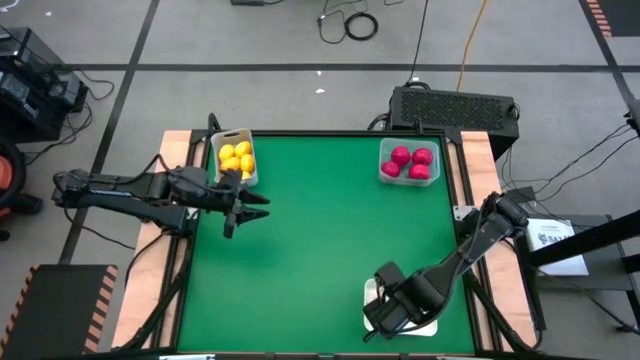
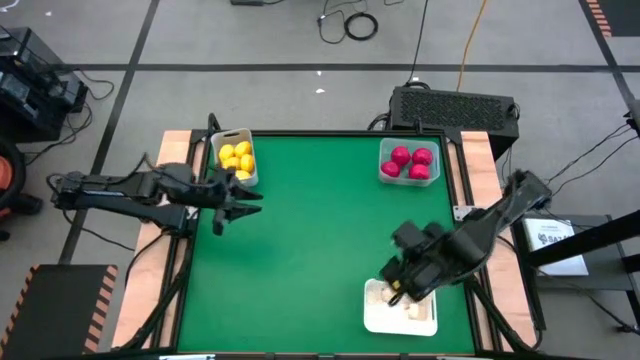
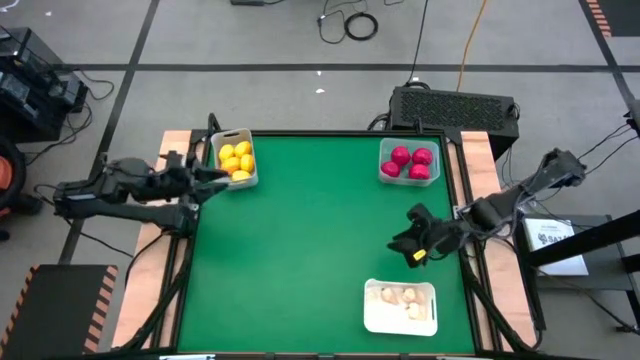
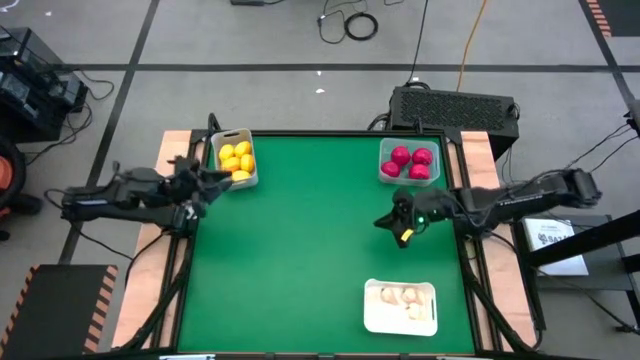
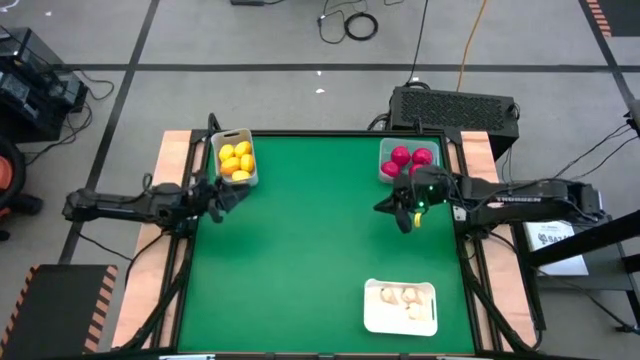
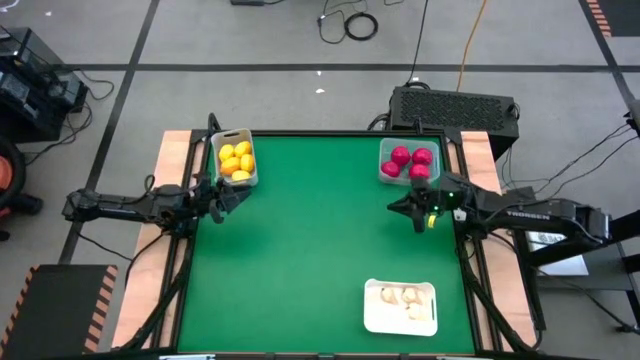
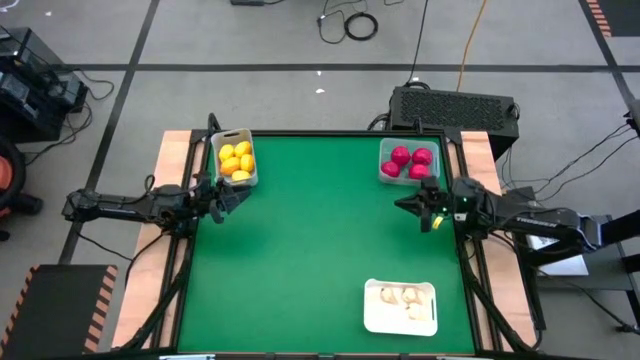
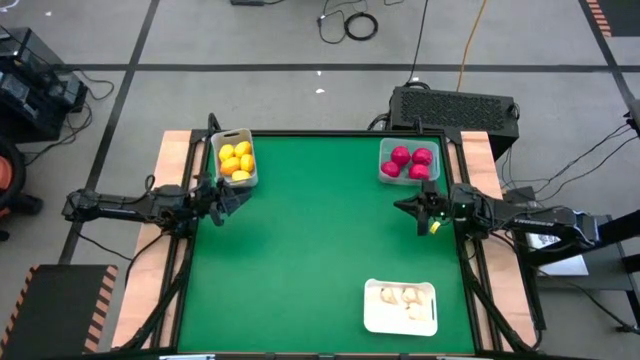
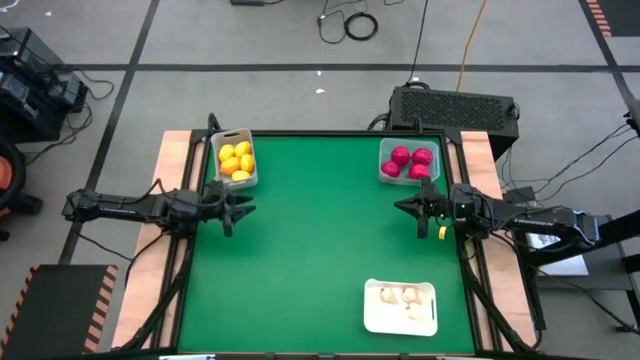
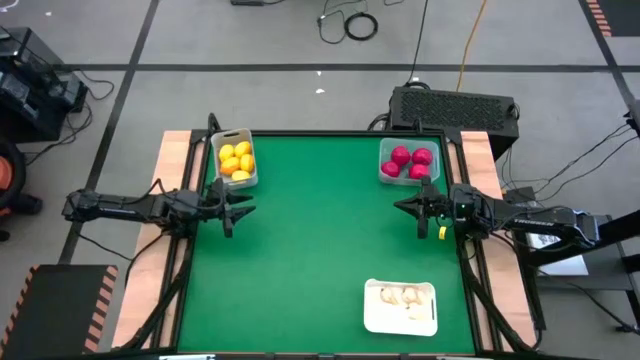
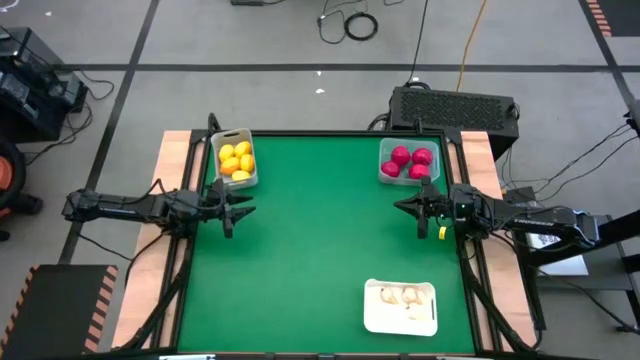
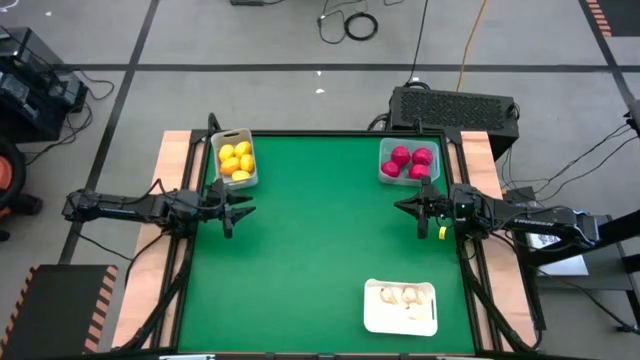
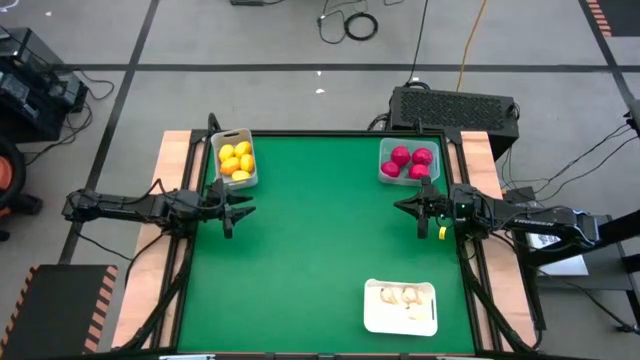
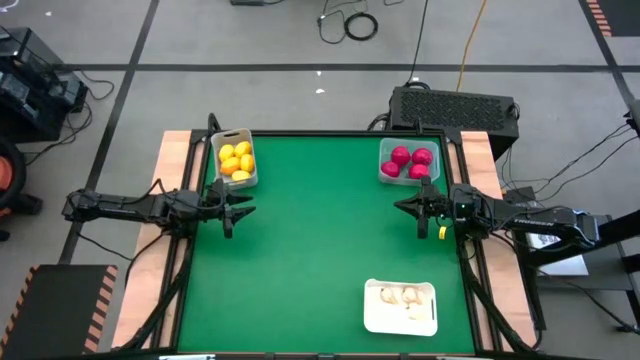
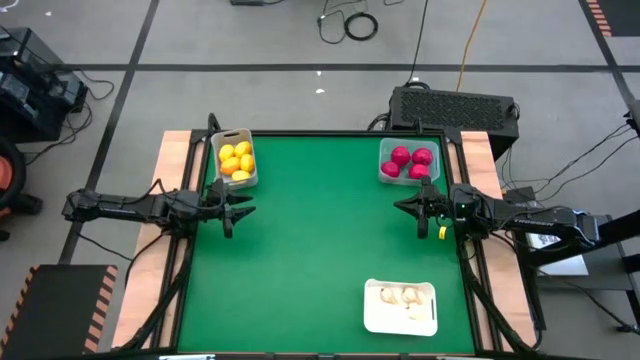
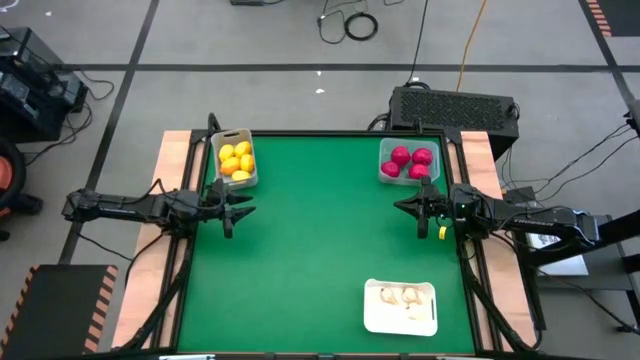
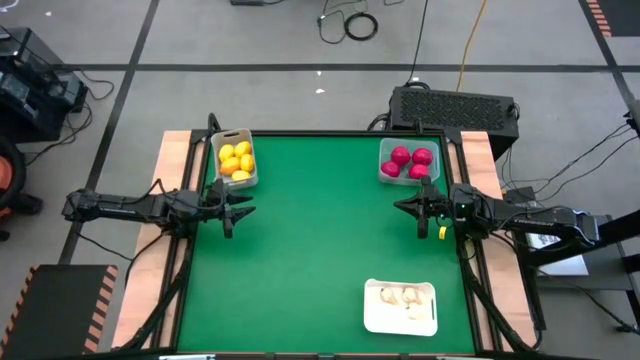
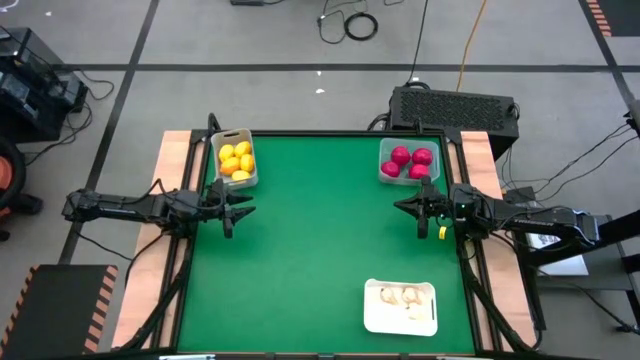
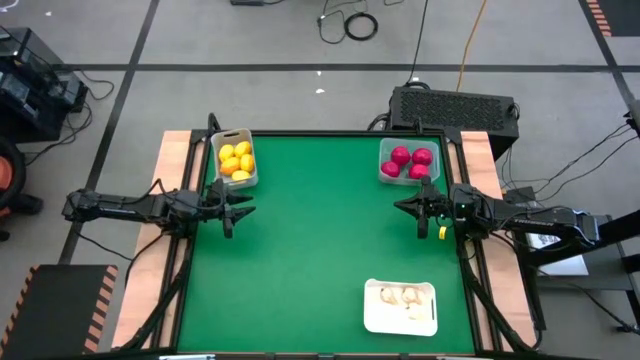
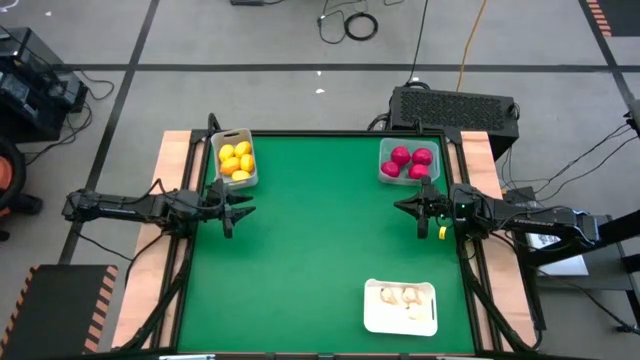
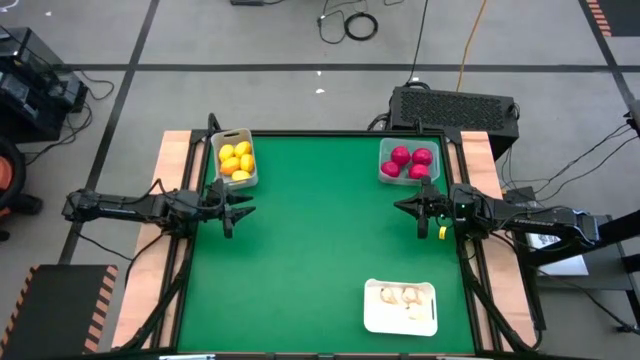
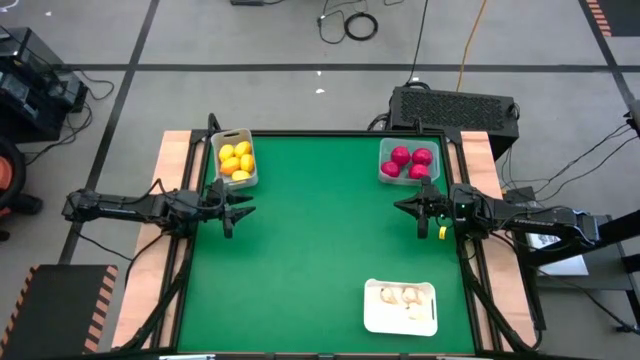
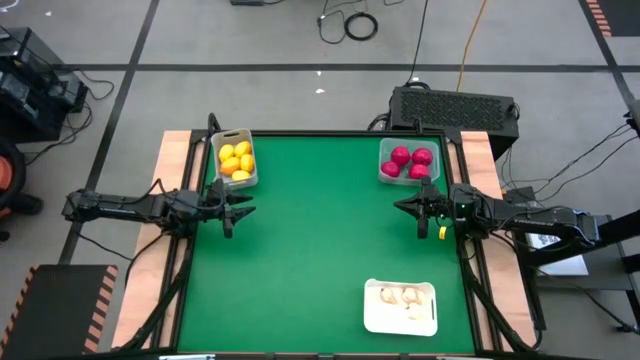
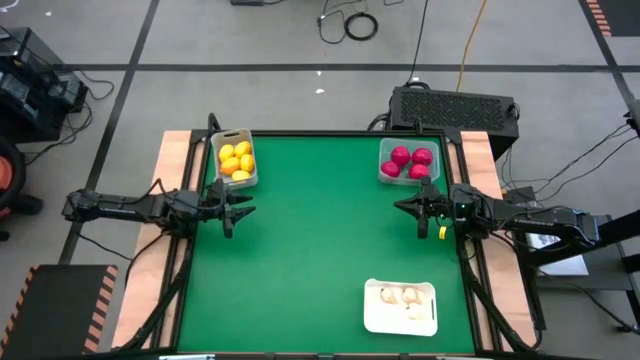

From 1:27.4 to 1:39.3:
Task: Sort produce into baskets
Return to Home Position

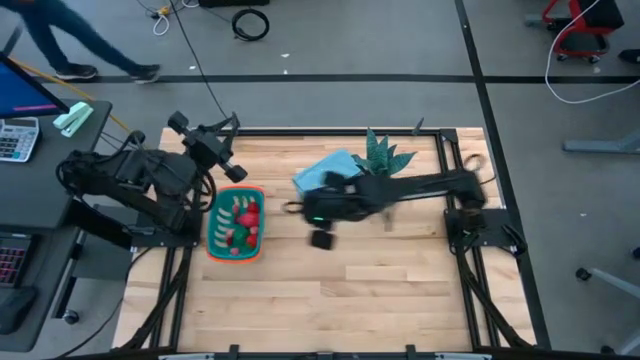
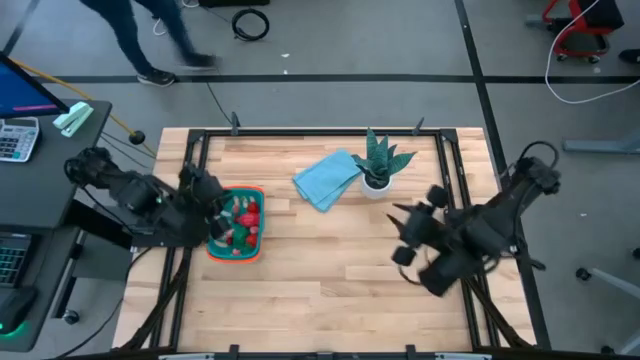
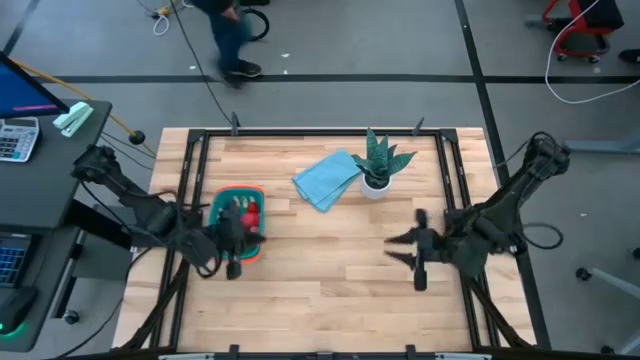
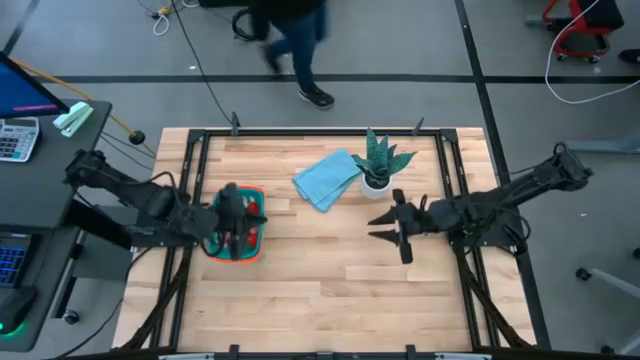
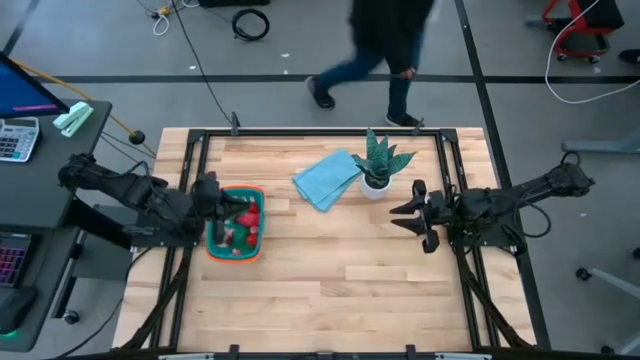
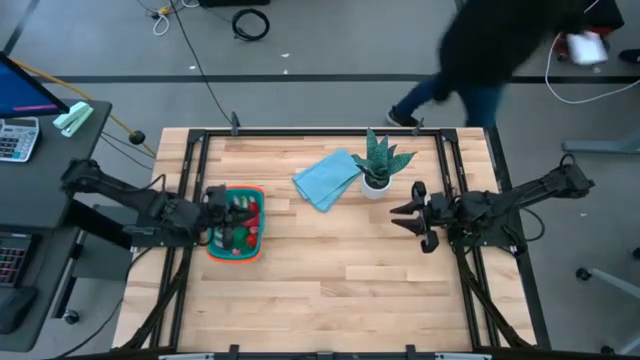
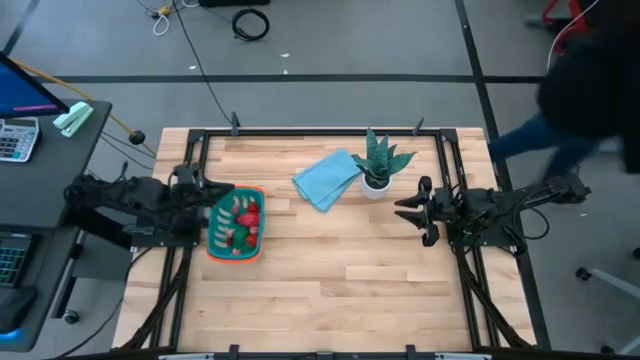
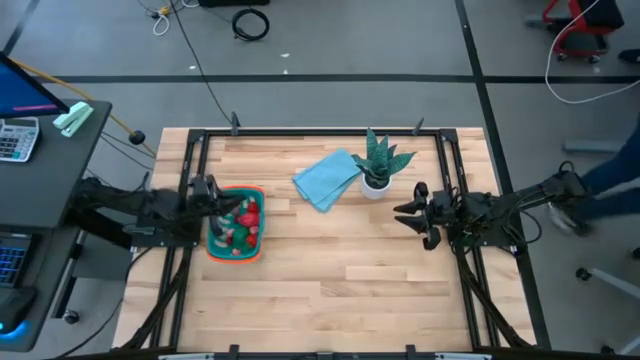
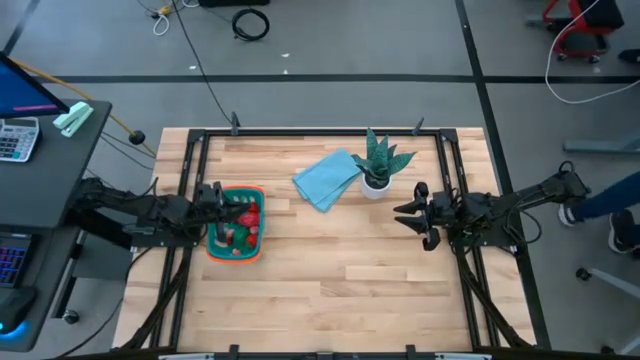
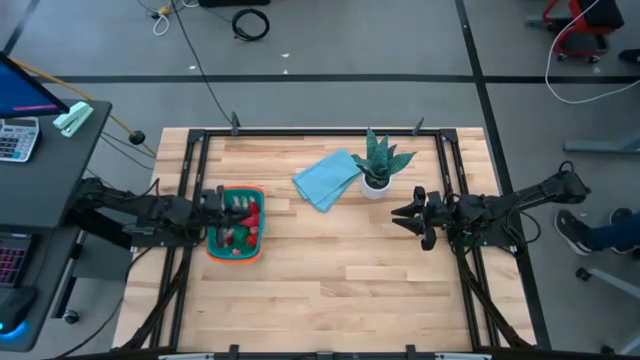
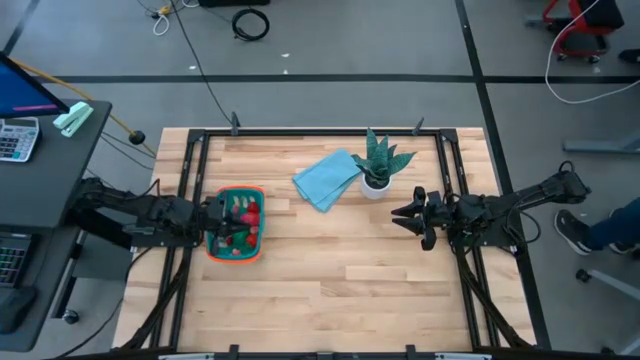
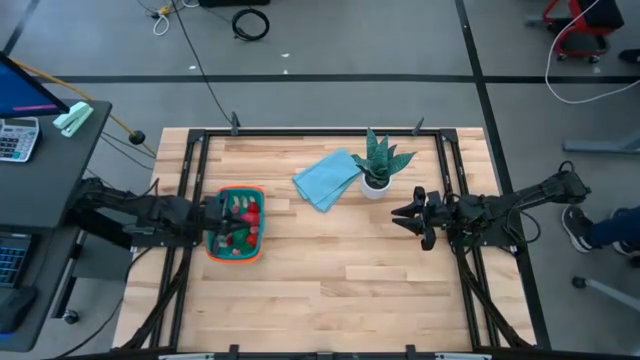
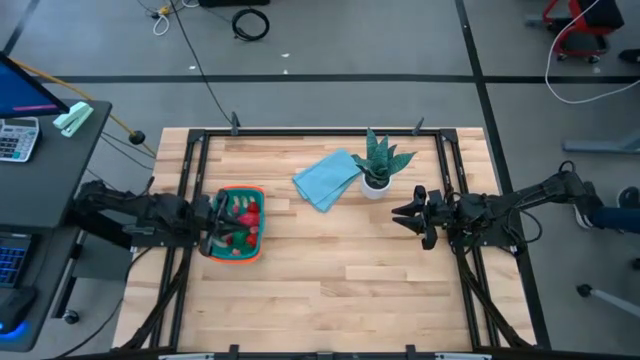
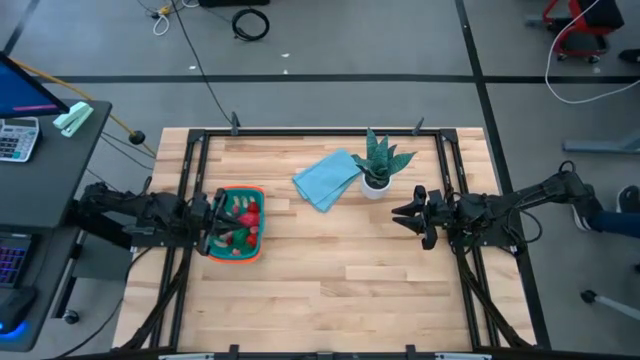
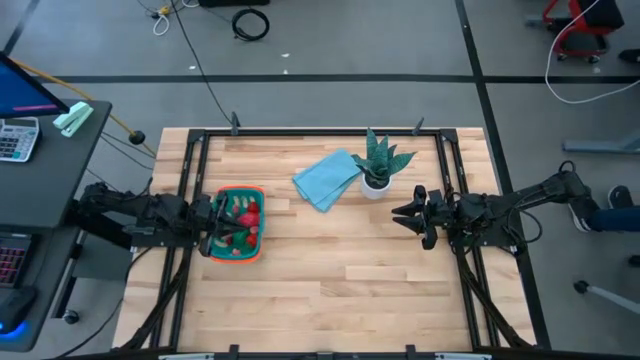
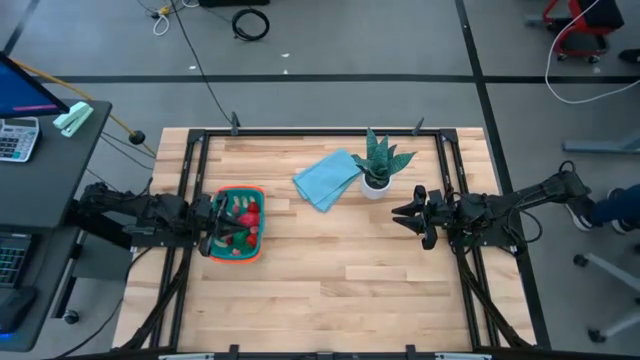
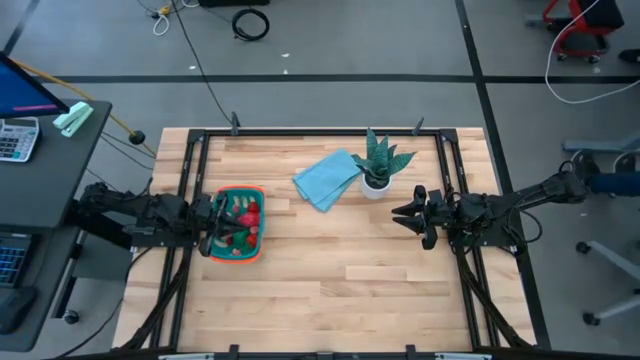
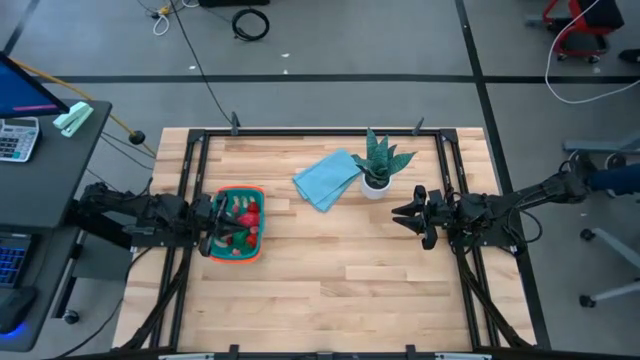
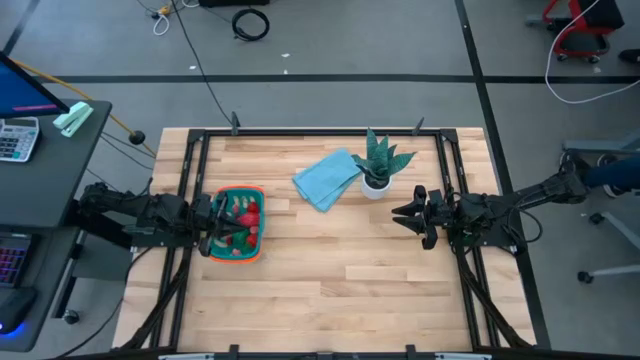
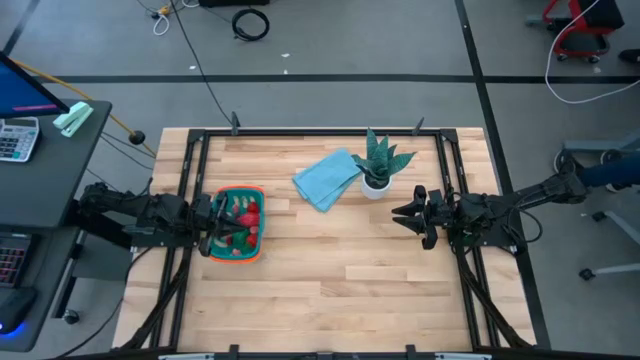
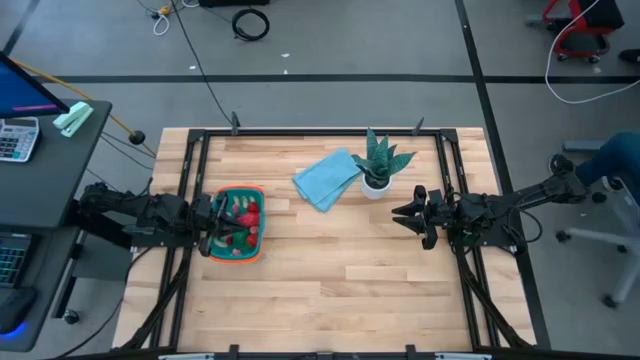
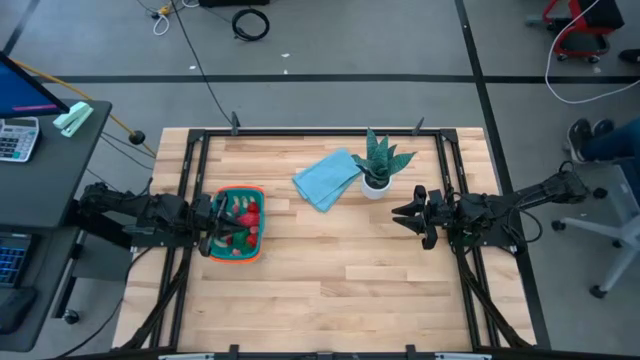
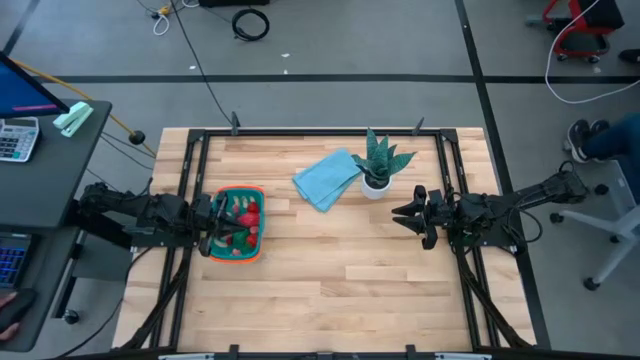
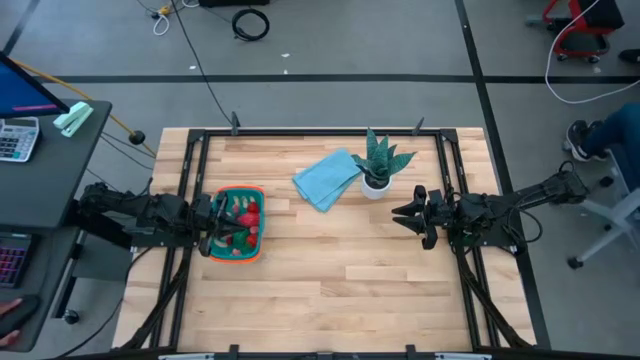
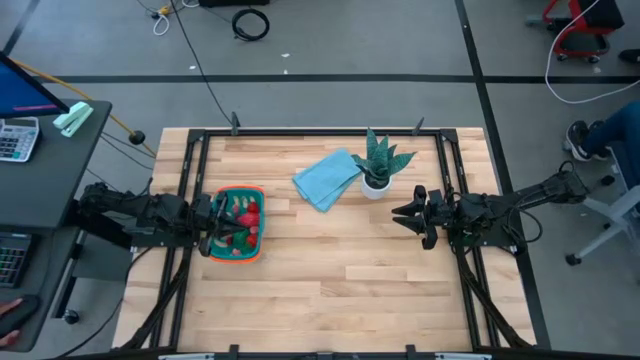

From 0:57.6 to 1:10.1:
Task: Pick and placing Produce into tupperware
Return to Home Position
